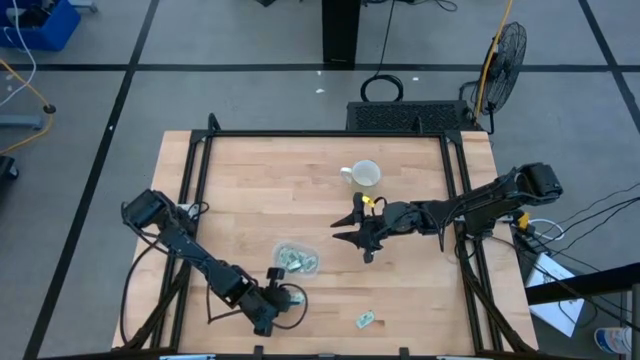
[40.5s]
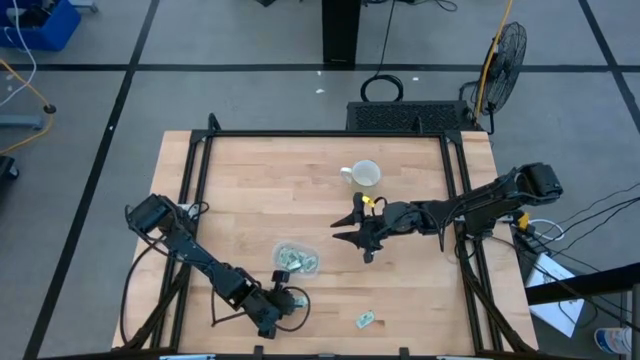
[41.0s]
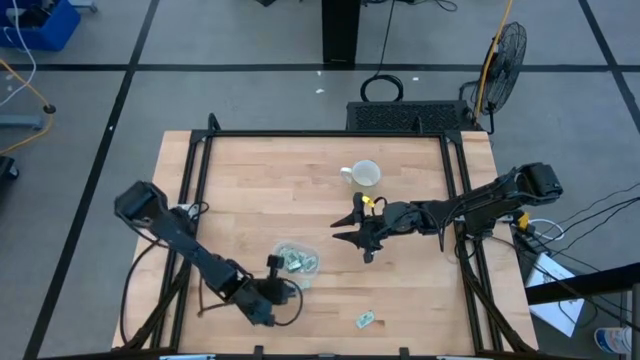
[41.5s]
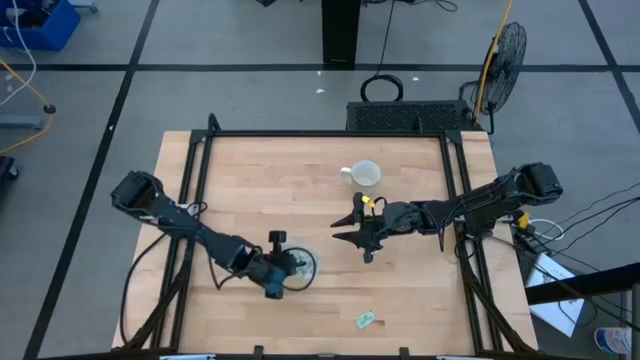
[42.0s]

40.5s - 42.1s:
Task: Pick and place Stevia / Truvia into bins
Put the light green stevia packet into the transparent bin

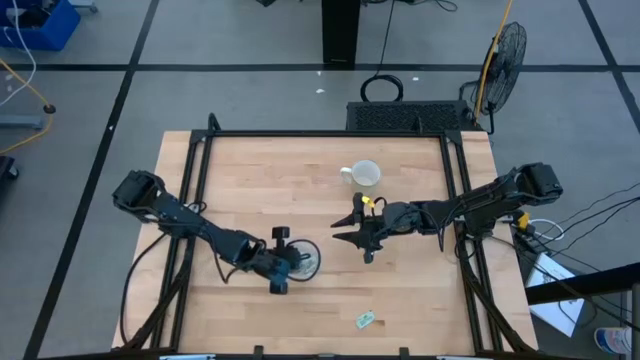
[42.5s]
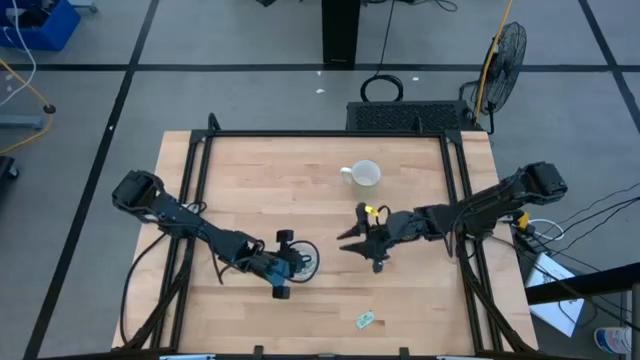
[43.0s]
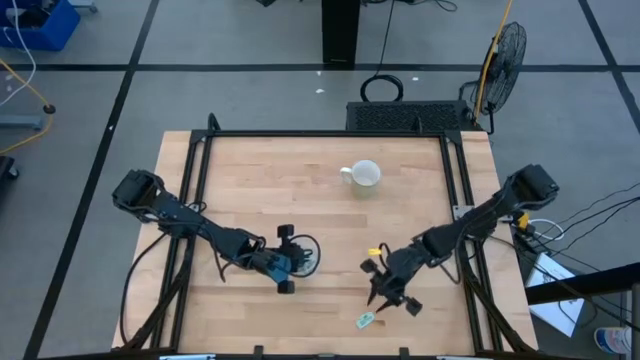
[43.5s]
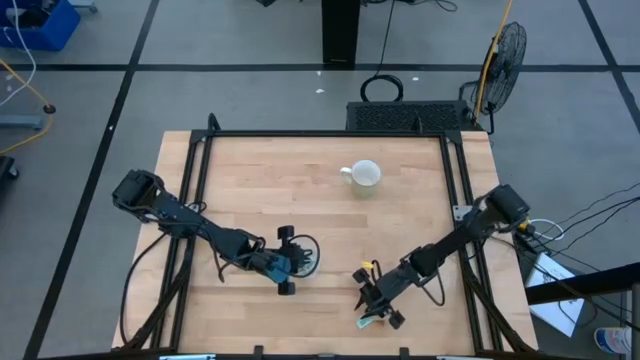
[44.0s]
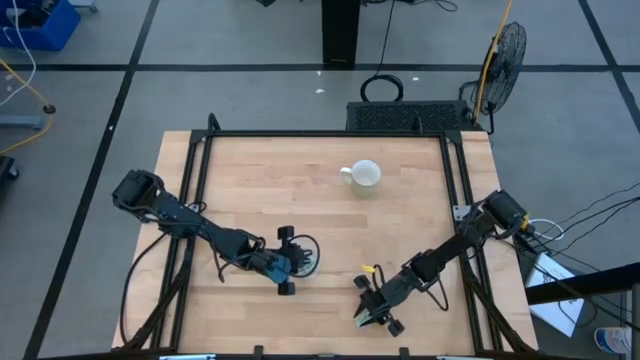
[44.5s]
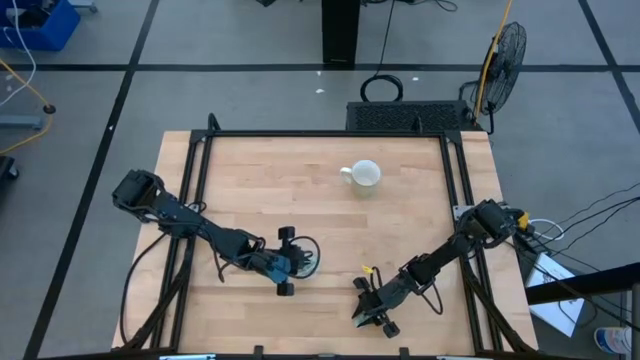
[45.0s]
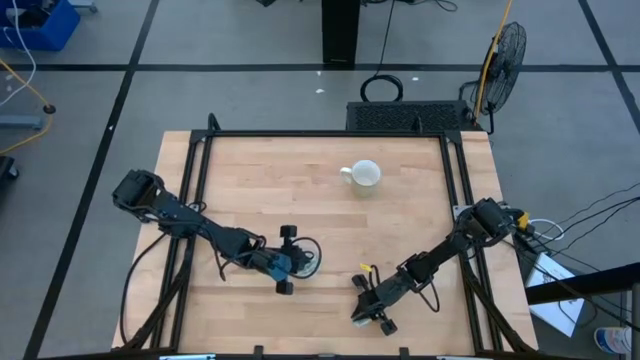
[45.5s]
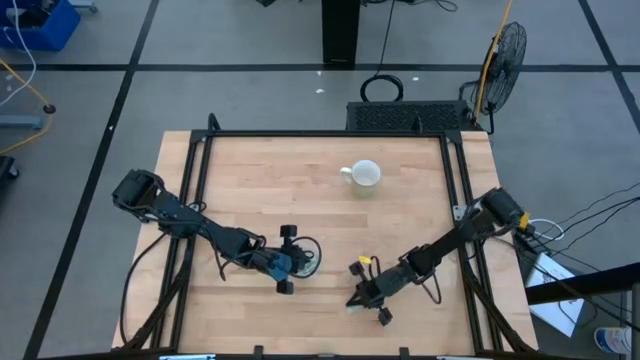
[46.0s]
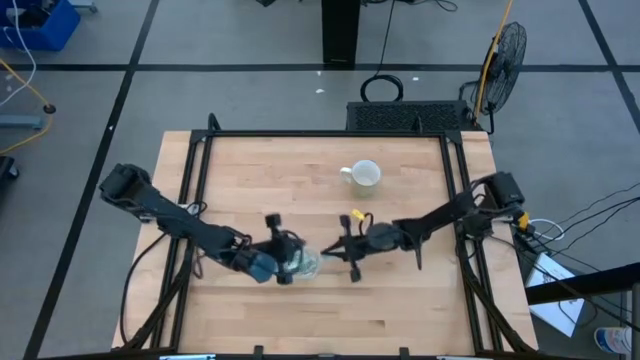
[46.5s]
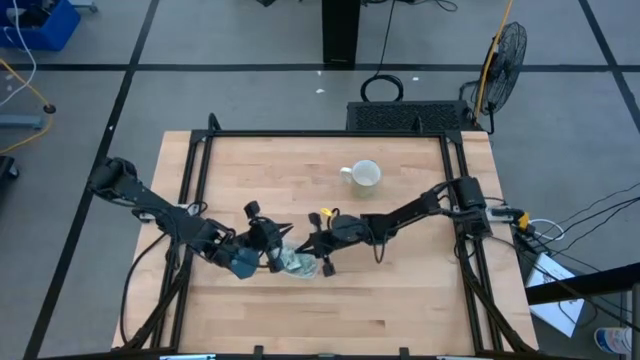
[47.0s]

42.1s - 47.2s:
Put the light green stevia packet into the transparent bin

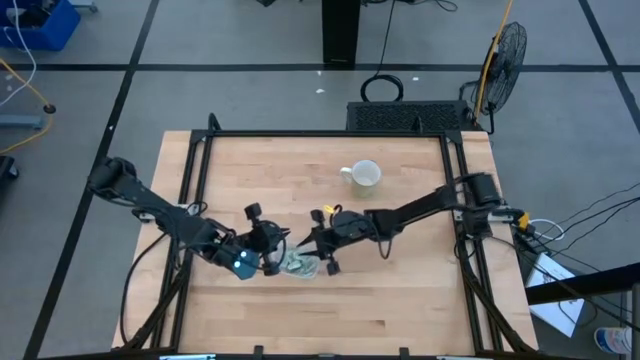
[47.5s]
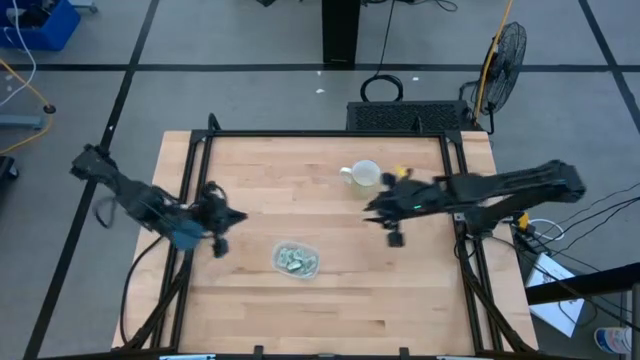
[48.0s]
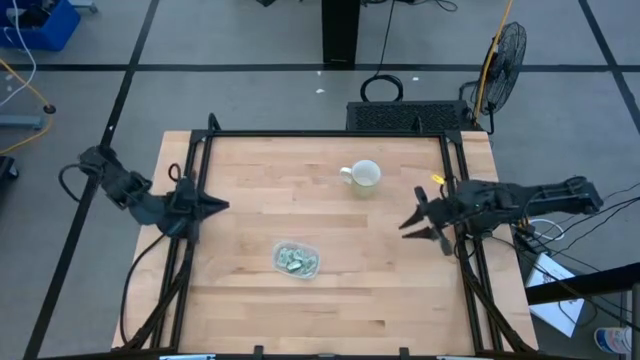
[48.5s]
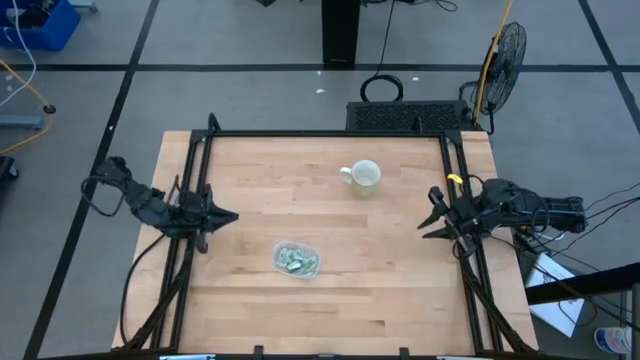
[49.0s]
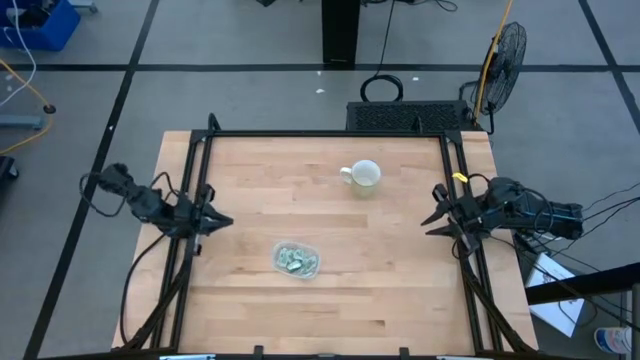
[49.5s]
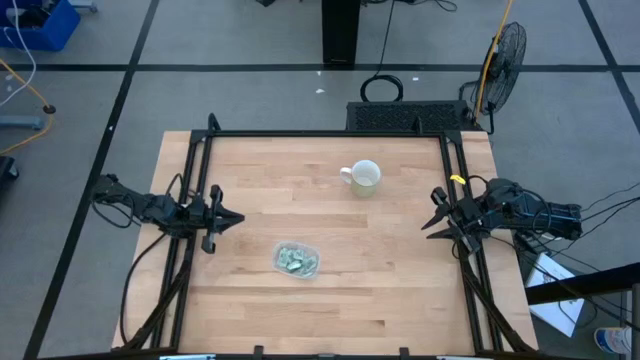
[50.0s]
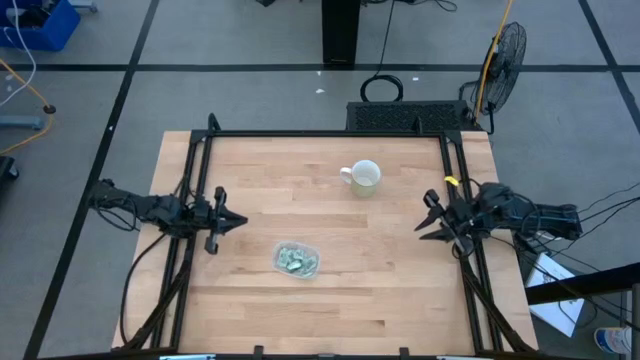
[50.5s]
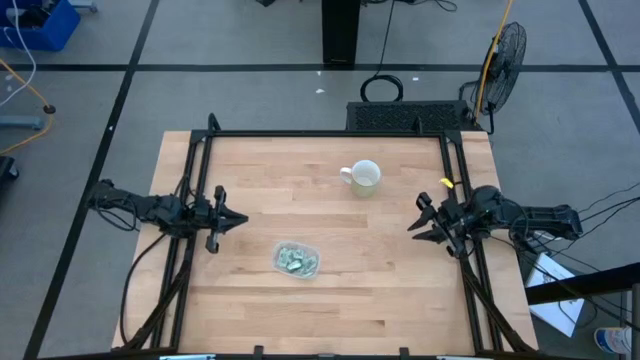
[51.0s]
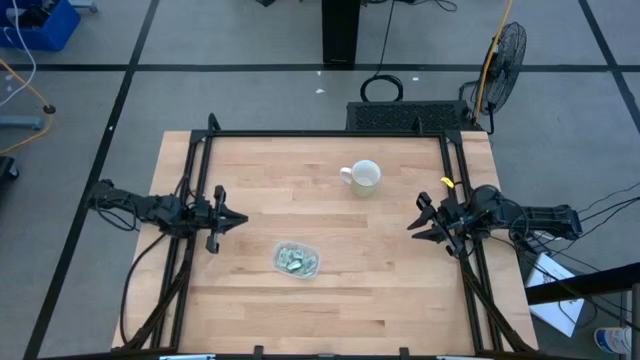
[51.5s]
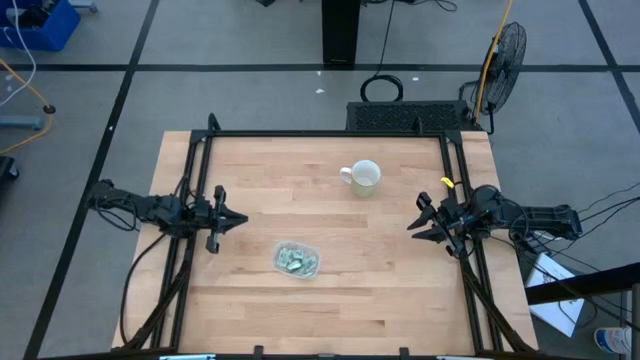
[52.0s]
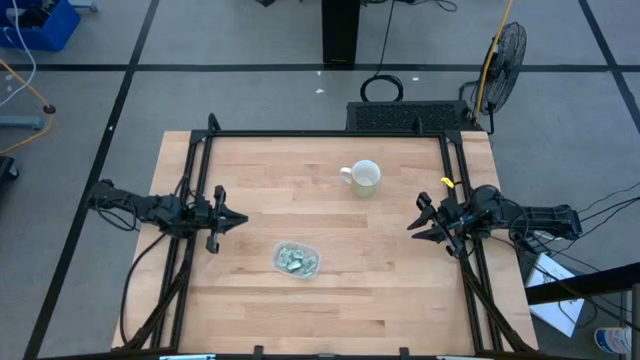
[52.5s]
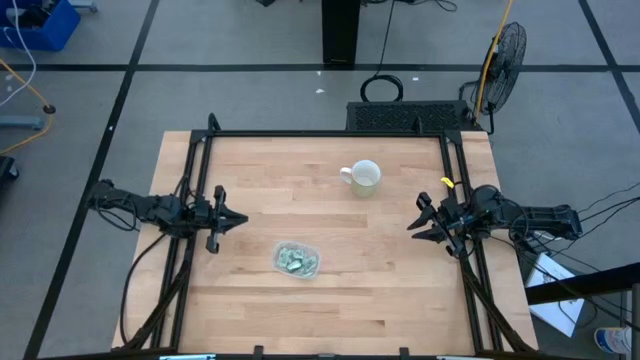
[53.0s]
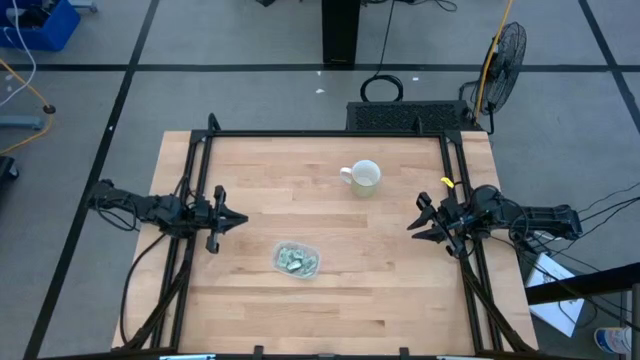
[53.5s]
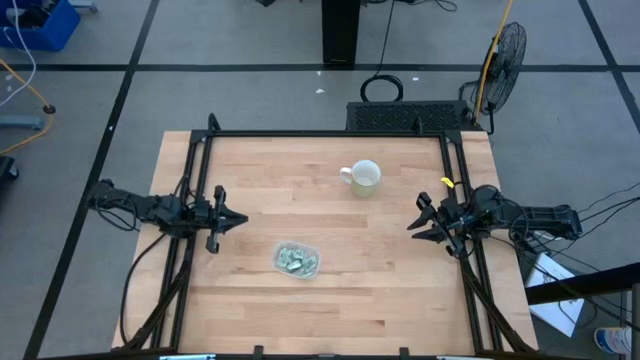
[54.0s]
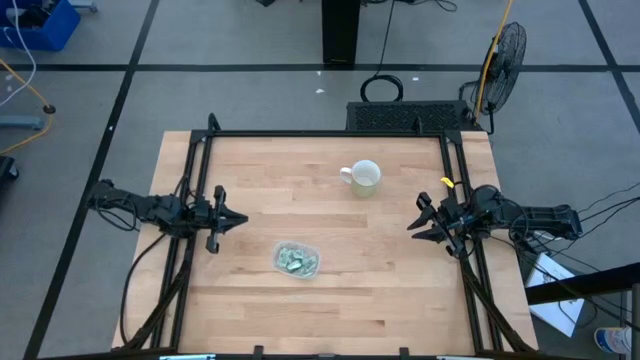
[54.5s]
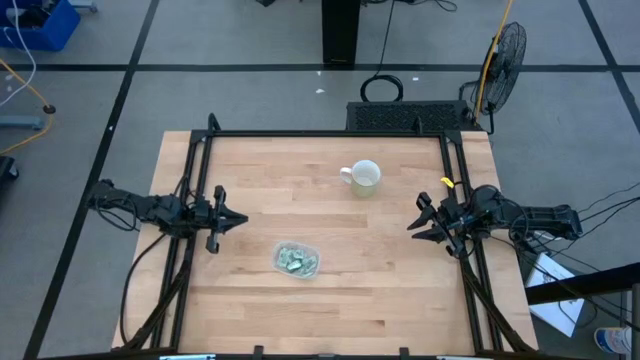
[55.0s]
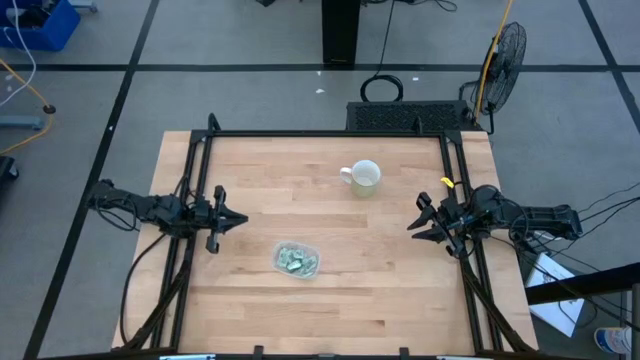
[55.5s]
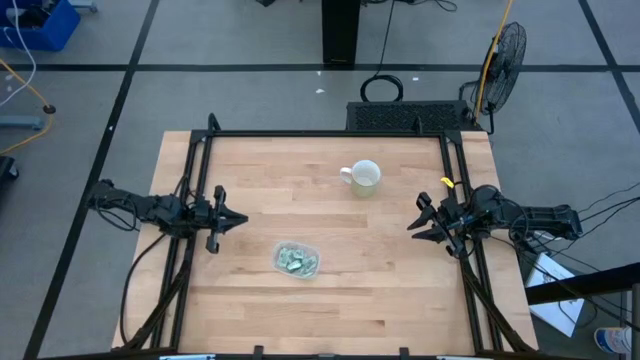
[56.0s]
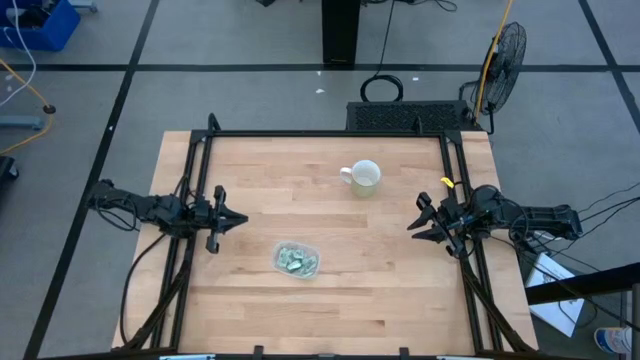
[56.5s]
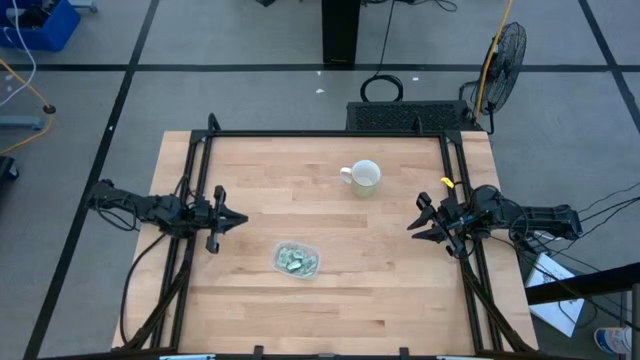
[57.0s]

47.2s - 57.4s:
Return to Home Position

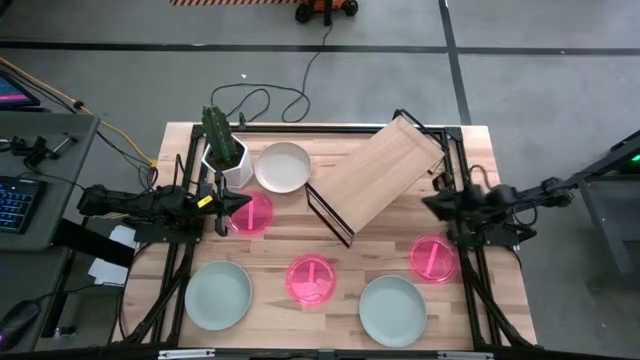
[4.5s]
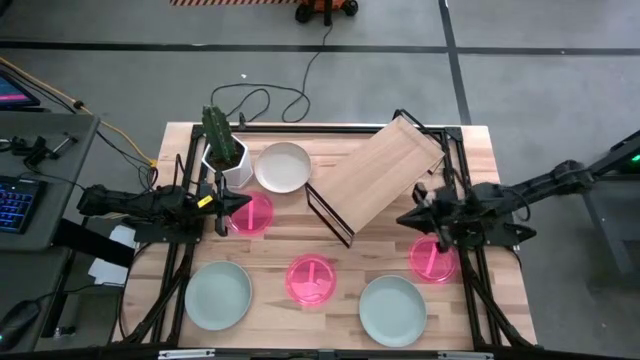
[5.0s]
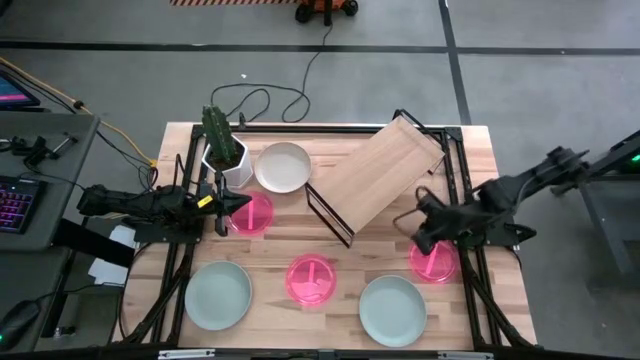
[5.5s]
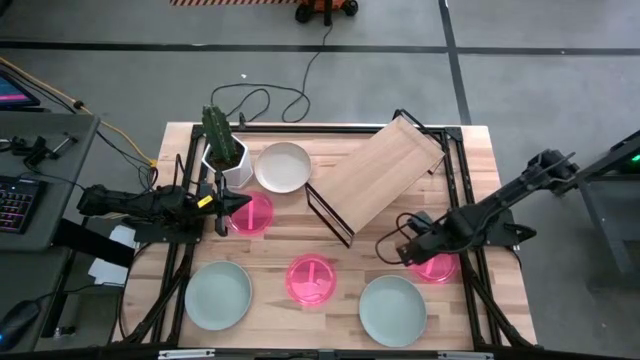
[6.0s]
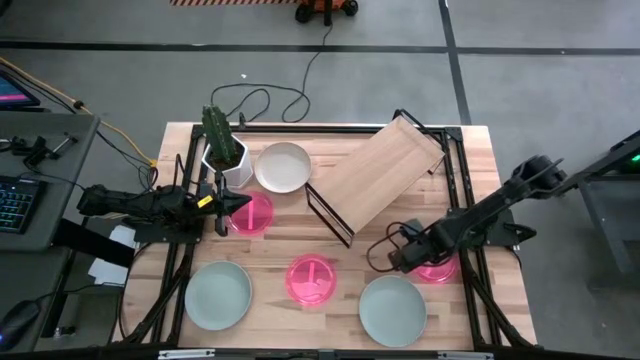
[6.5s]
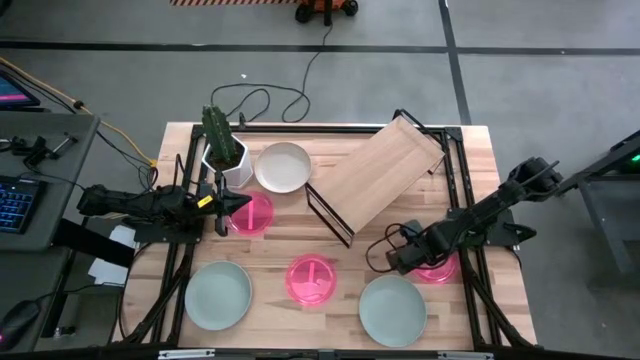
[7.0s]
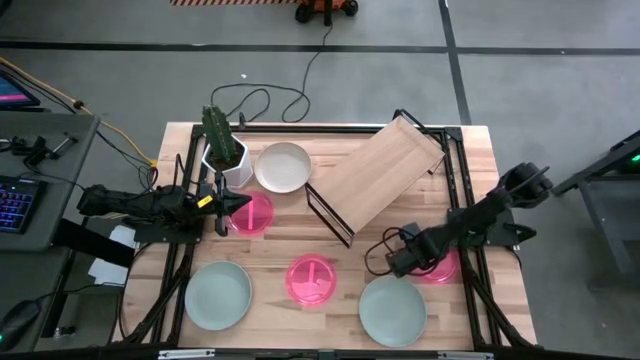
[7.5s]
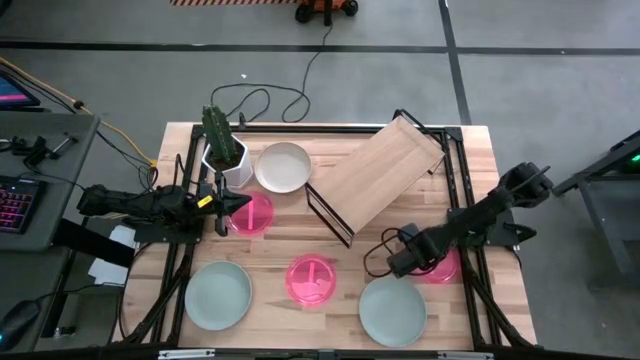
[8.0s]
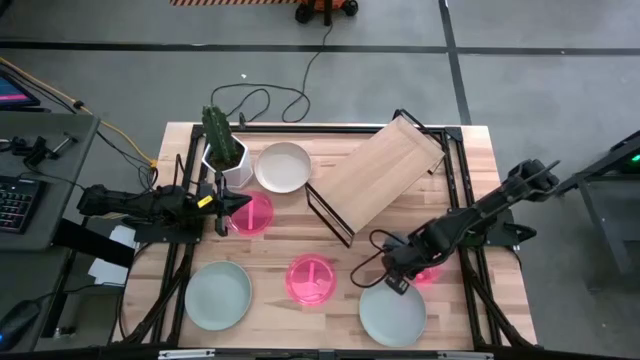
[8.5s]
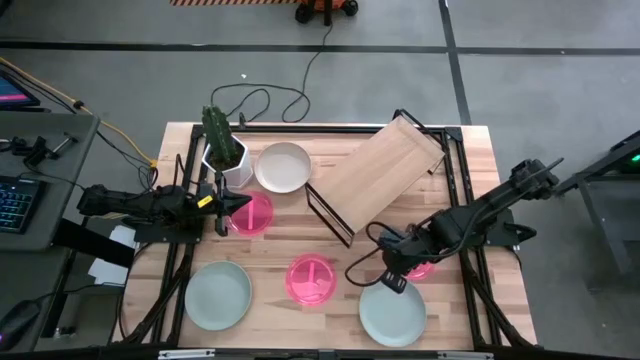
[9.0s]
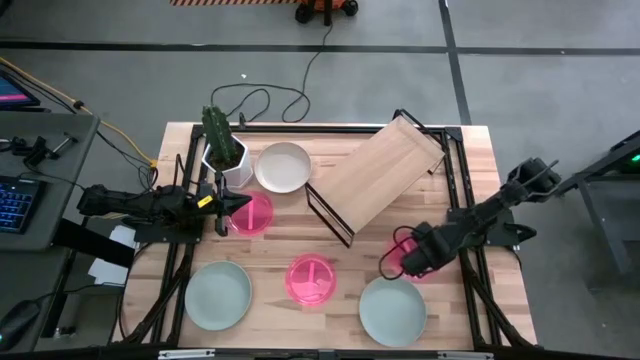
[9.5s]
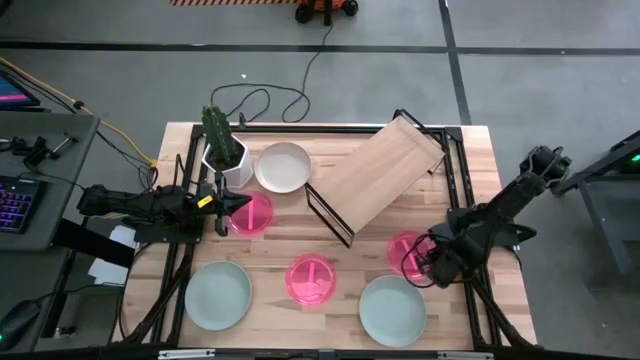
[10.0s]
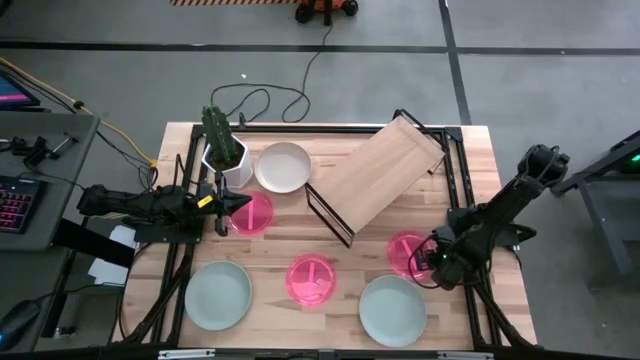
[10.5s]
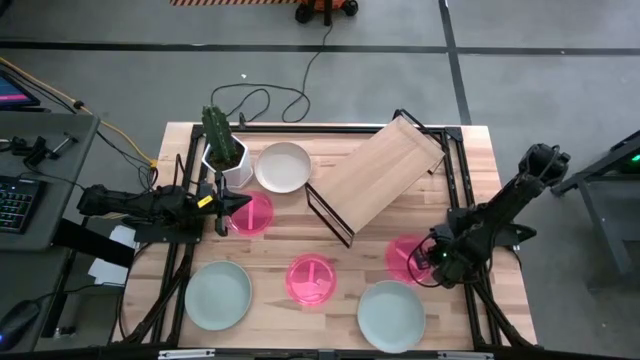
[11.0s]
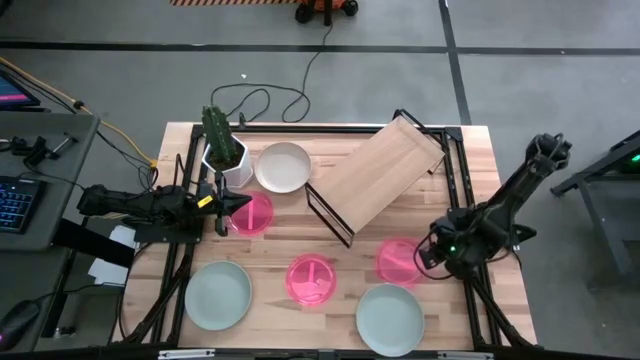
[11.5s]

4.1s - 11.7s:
Task: Place and stack plates onto a shelf
Put the right pink plate on the shelf
